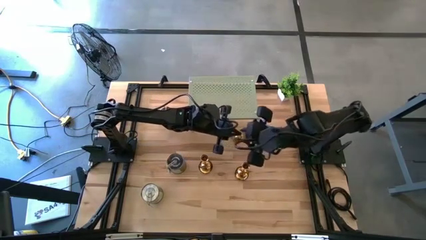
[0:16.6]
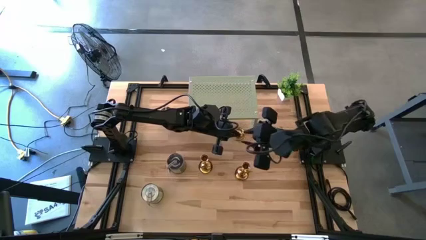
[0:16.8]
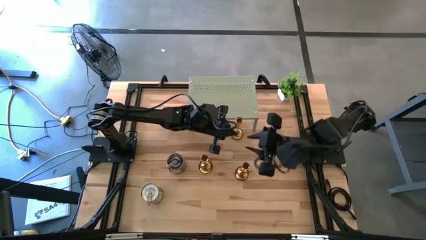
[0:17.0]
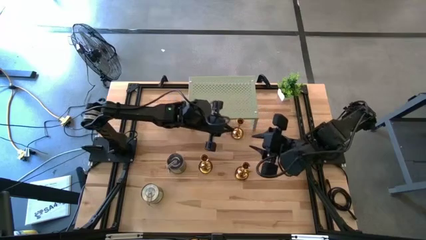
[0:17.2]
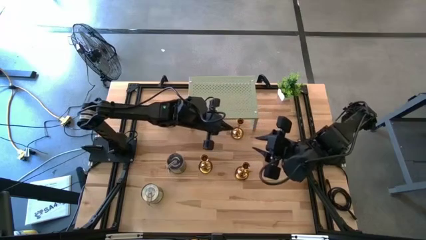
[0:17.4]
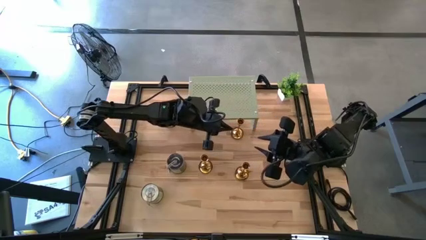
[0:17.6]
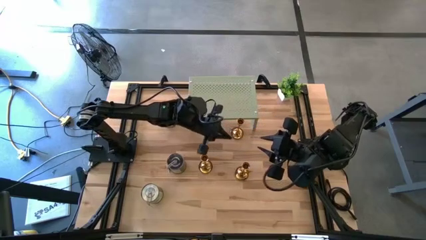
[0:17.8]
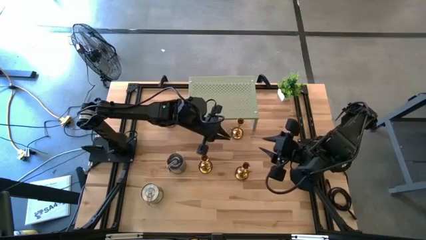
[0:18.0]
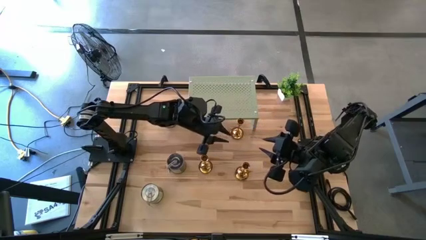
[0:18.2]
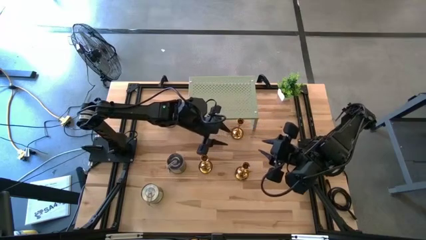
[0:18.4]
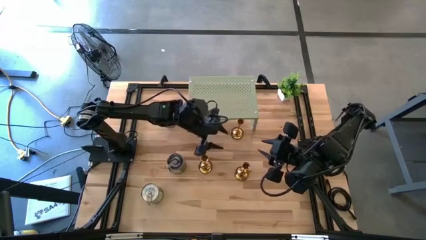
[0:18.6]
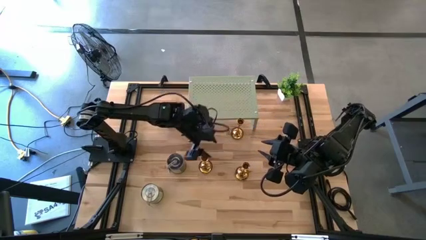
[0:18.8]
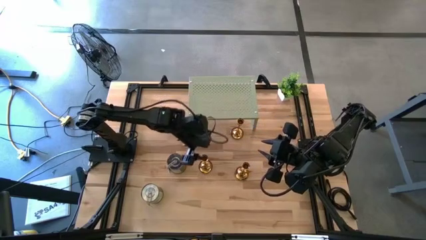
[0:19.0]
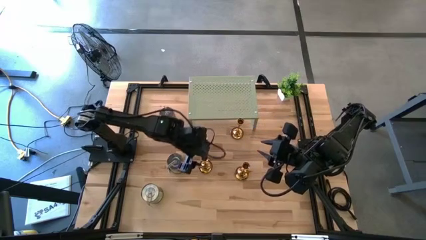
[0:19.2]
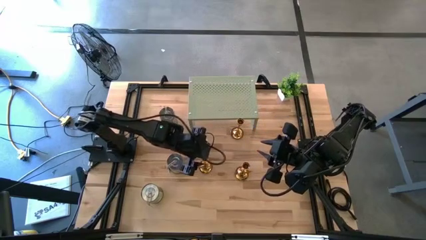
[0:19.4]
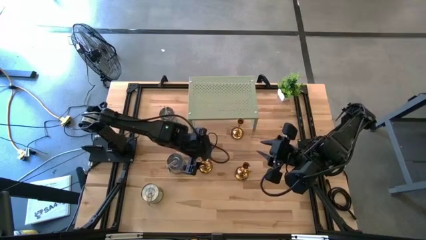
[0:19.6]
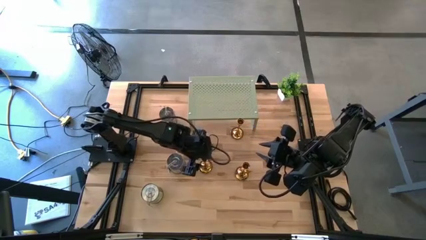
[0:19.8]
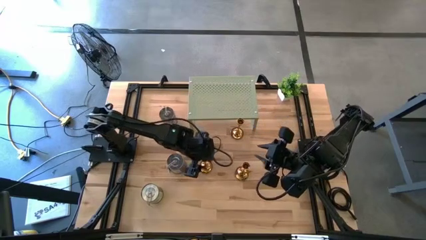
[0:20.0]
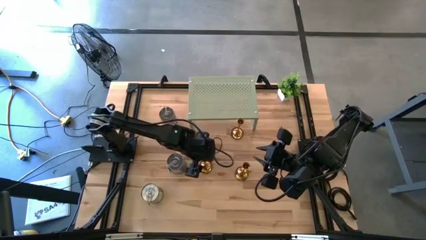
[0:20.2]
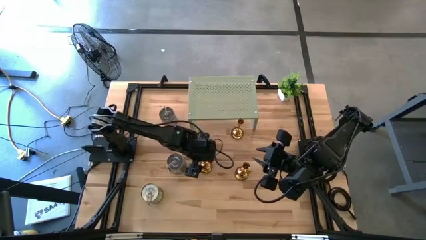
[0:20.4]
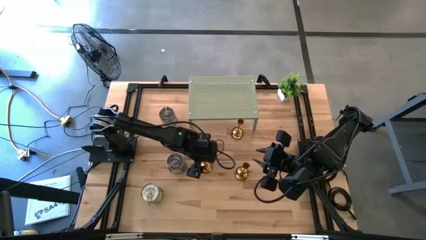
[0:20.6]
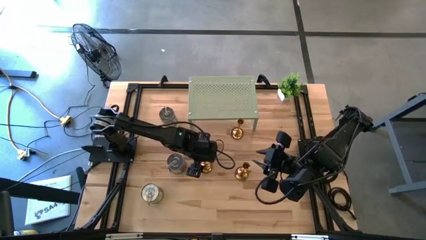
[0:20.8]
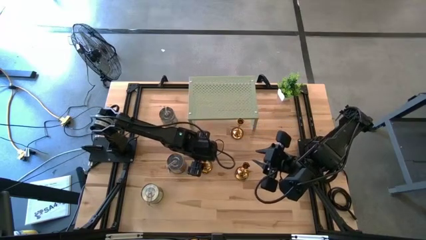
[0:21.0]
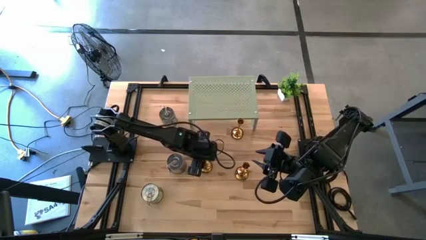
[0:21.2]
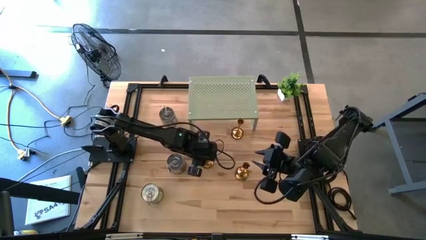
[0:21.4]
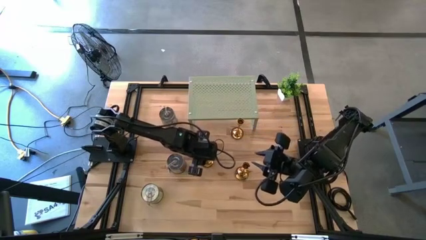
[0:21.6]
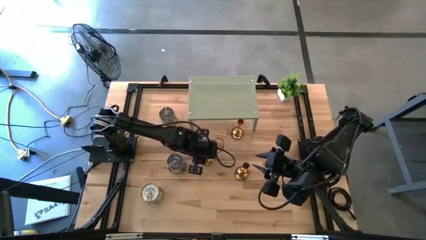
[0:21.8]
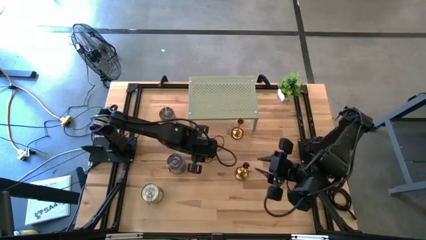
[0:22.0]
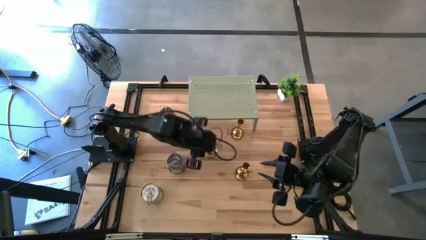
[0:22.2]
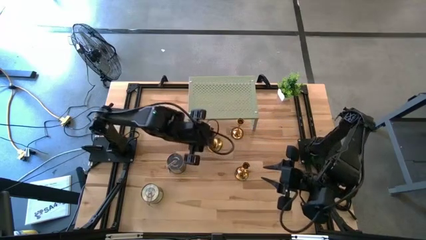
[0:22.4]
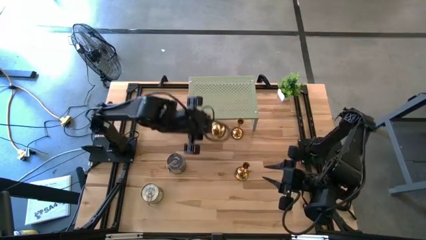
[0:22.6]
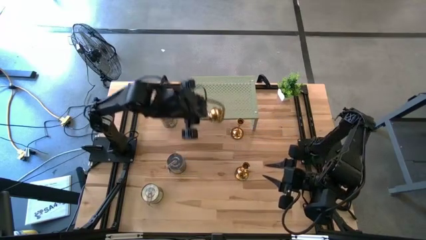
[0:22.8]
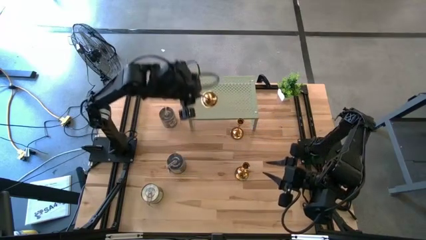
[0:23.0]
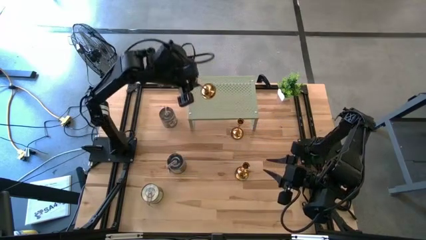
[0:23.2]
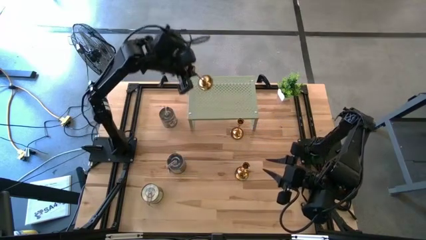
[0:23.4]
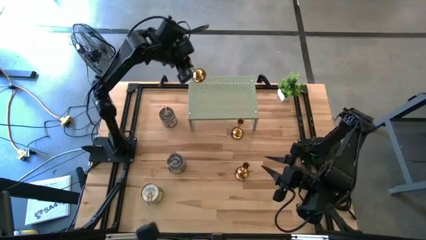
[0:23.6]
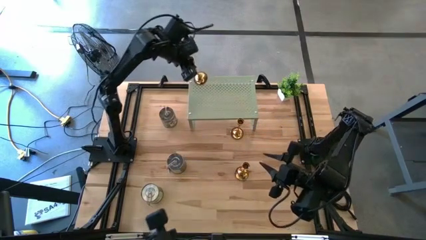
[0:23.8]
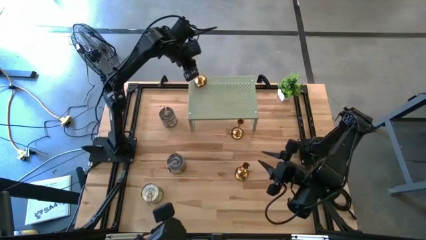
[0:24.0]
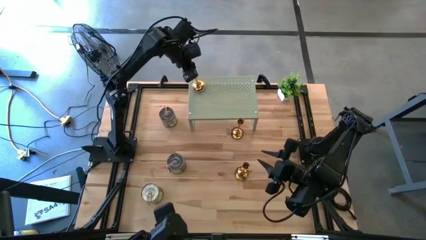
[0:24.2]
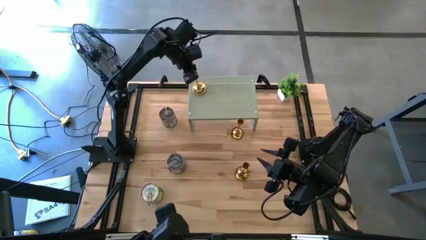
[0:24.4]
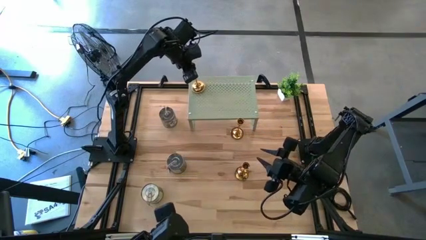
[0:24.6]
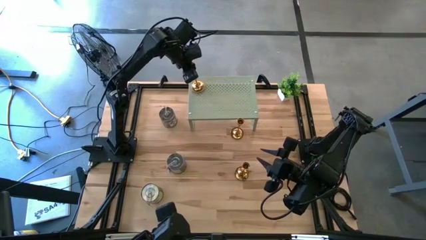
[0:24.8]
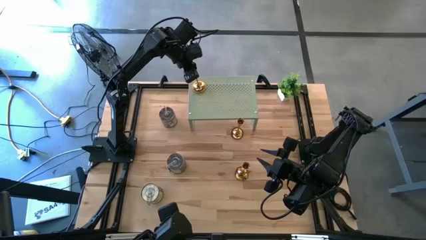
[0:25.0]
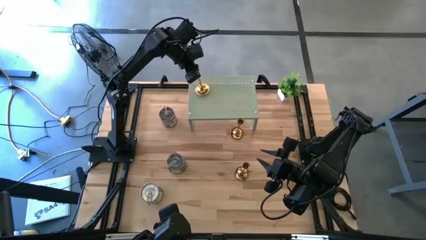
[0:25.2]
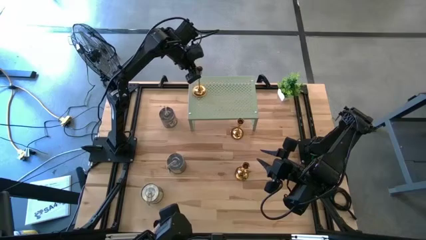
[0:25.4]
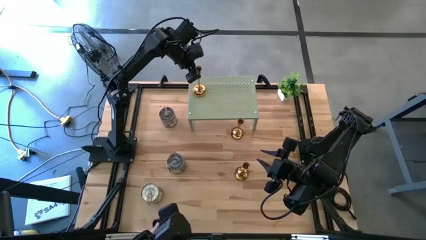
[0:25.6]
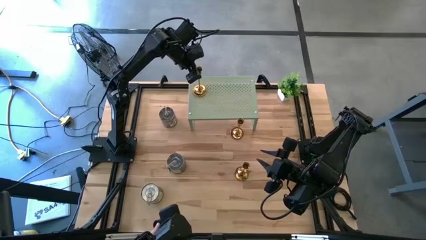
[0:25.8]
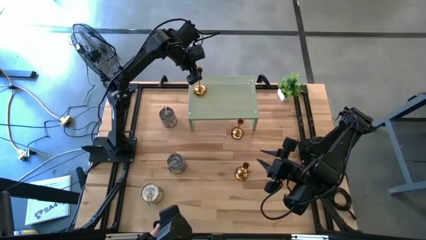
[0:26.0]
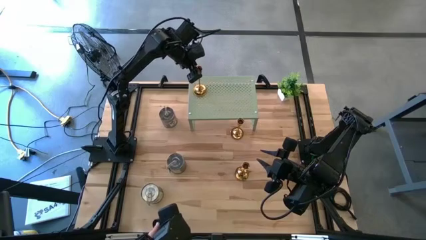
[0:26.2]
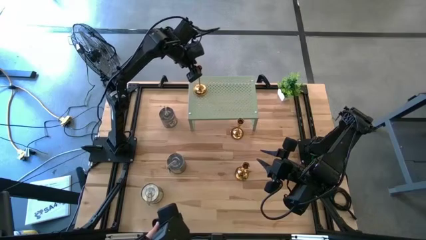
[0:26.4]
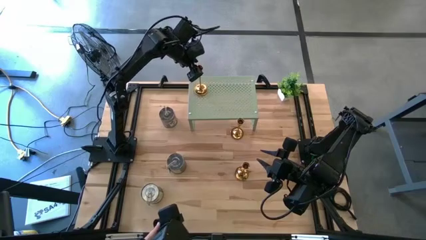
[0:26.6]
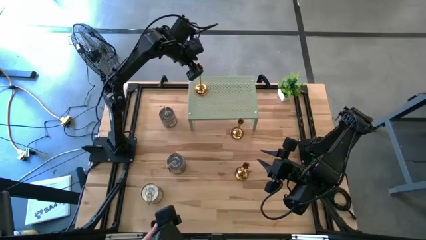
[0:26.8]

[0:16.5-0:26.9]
Task: Pick & Place candle stick holders
Put the left gold candle holder on the shelf

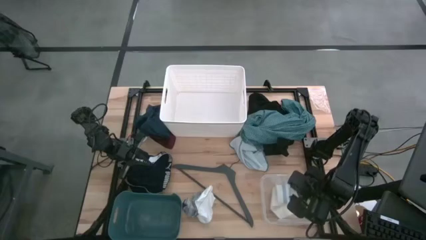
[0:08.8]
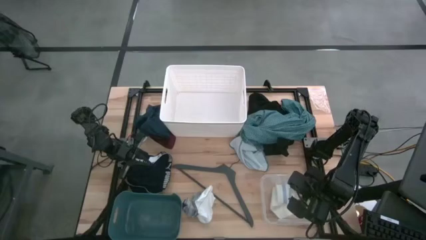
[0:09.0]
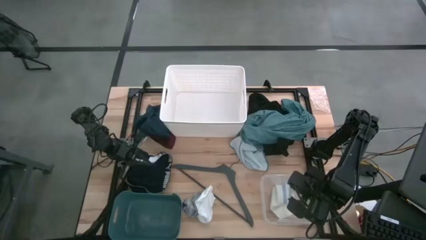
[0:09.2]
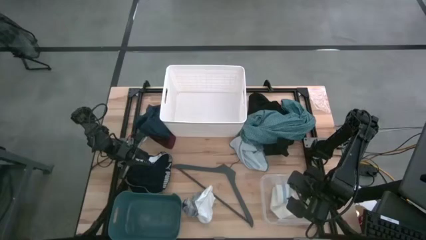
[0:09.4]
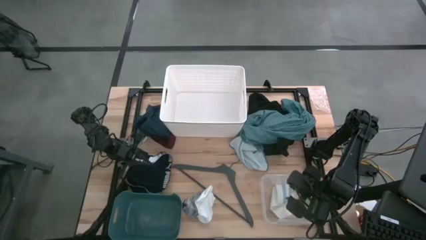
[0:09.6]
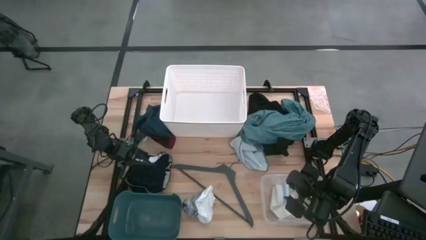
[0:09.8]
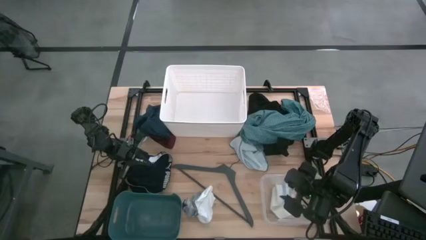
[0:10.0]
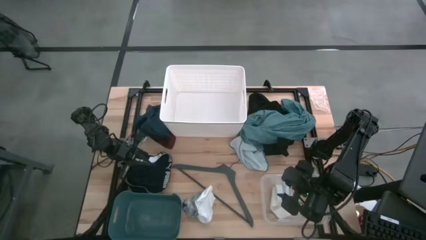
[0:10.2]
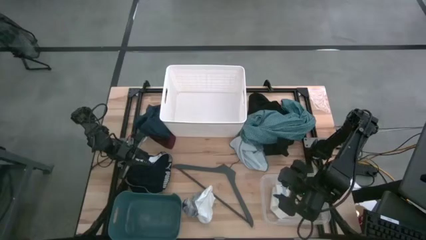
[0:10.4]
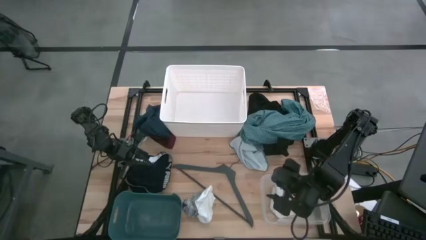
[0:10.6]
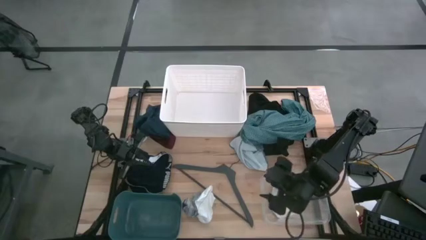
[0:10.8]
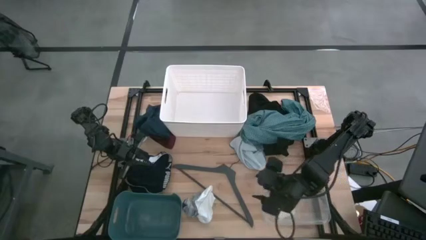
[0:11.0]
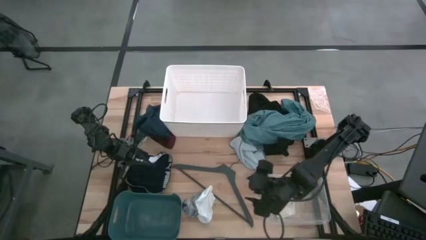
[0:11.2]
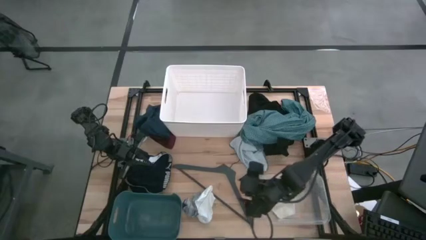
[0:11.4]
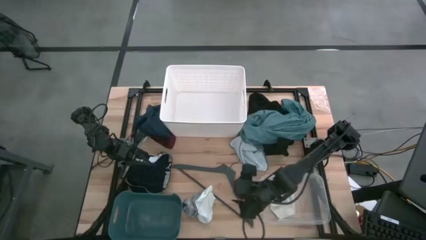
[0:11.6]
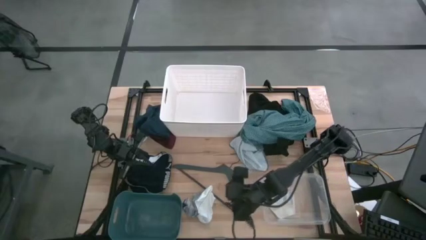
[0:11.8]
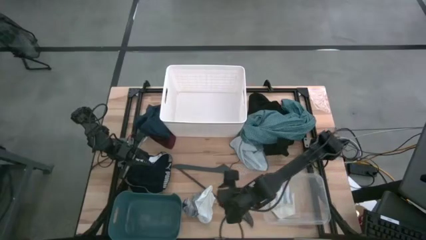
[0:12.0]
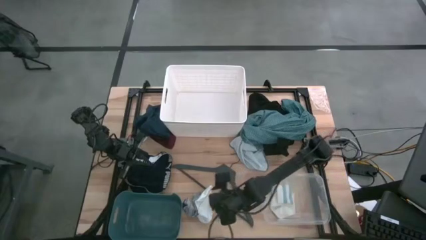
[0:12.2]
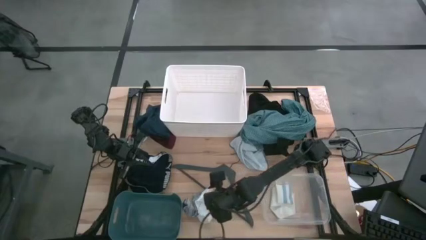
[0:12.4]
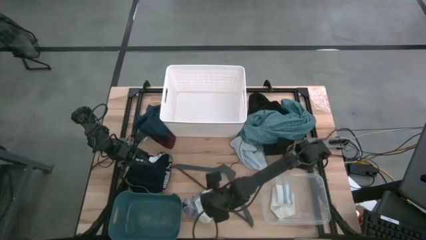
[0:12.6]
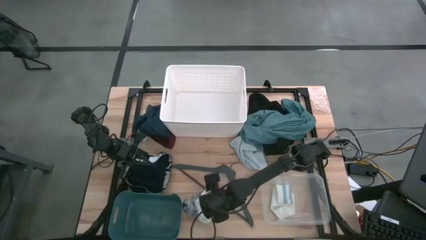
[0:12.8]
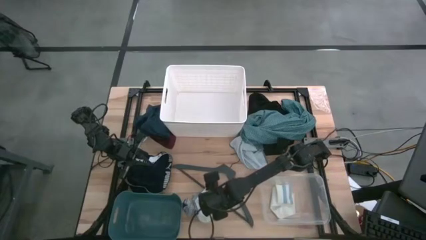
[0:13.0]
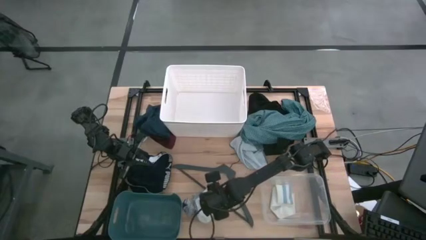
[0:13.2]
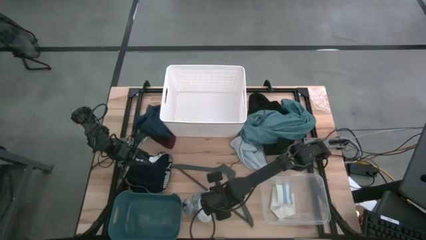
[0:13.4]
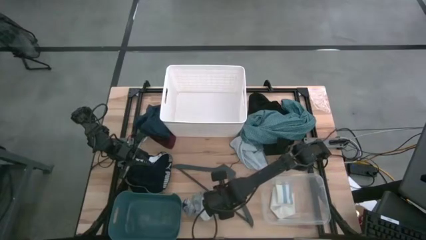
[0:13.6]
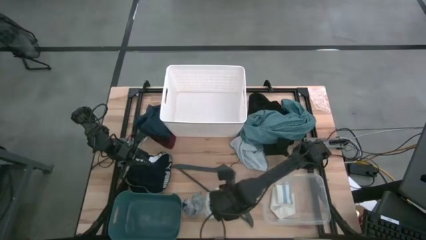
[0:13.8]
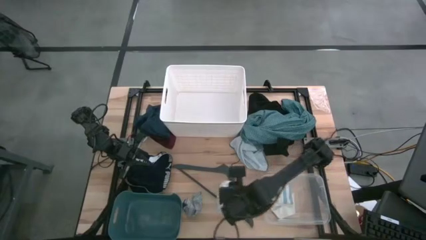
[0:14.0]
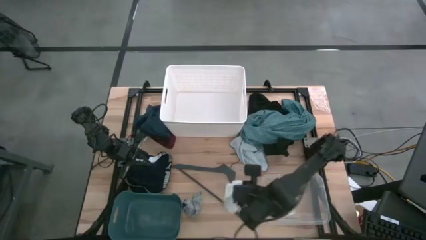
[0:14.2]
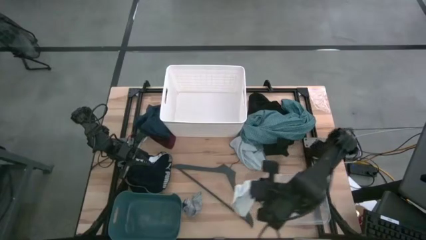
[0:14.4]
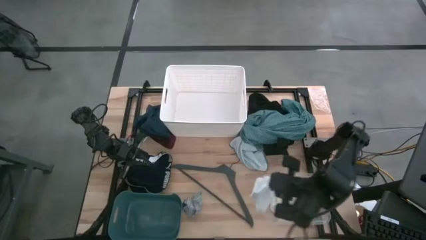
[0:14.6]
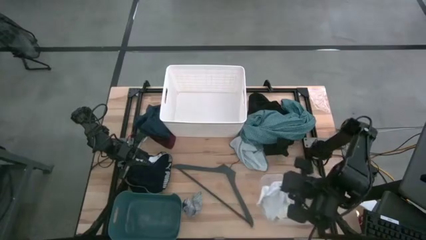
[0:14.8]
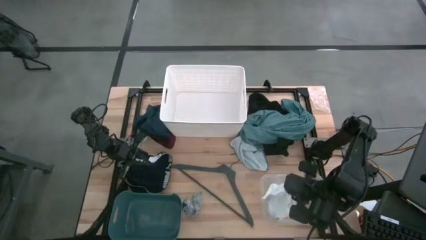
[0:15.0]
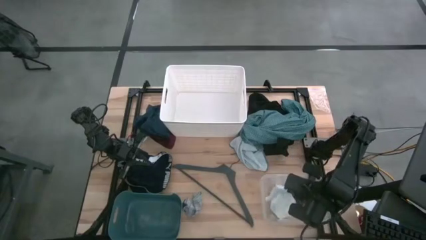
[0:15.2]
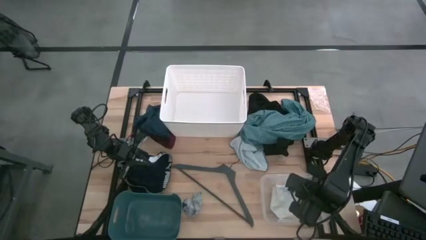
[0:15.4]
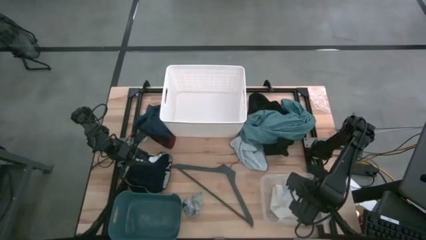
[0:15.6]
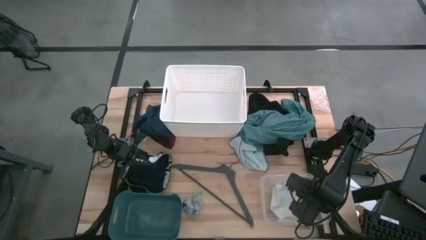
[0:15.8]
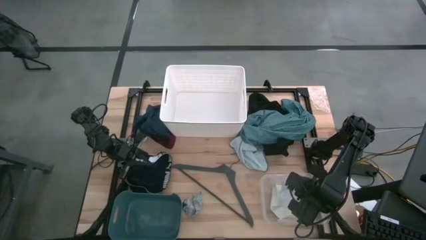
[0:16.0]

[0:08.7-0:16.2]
Task: Pick & Place Cloths
Put the white sock into the transparent bin
